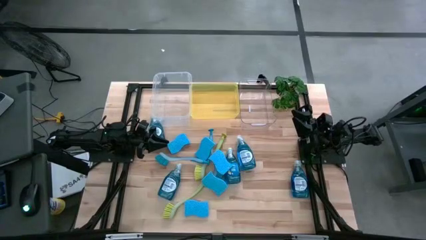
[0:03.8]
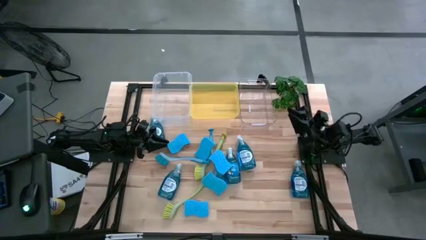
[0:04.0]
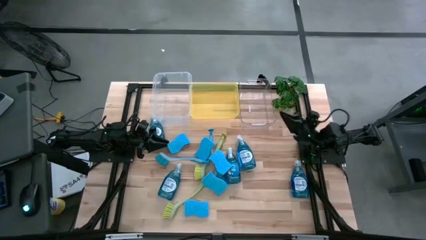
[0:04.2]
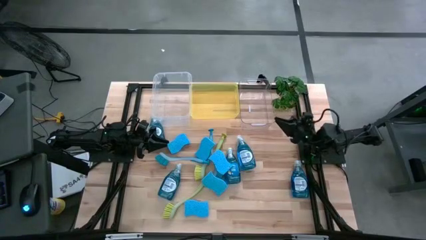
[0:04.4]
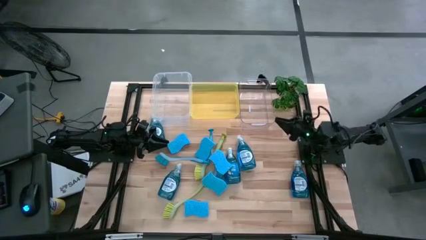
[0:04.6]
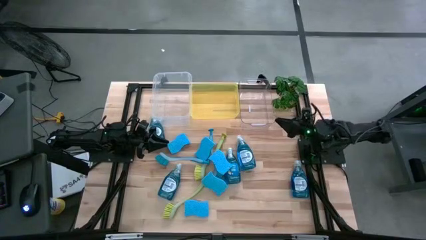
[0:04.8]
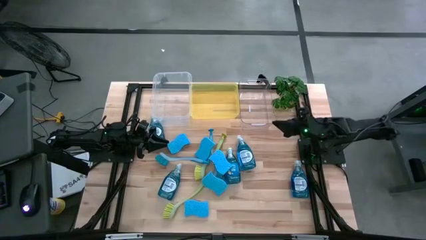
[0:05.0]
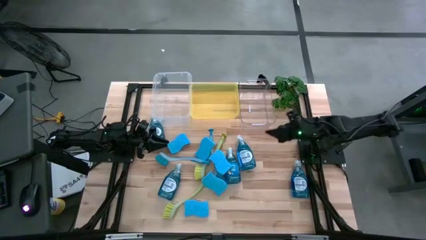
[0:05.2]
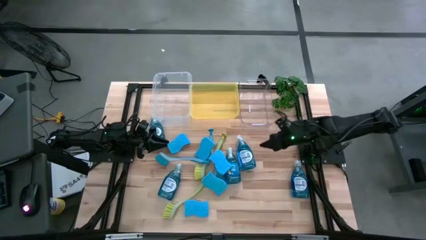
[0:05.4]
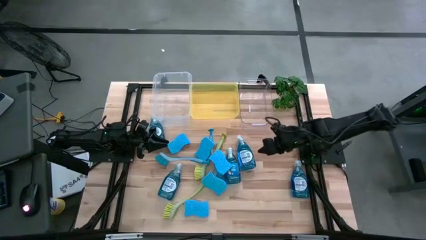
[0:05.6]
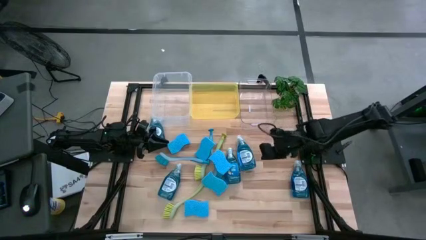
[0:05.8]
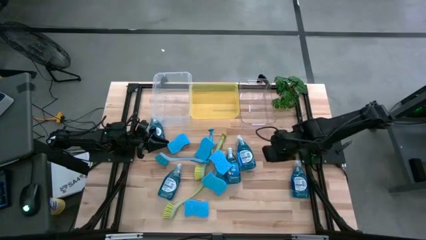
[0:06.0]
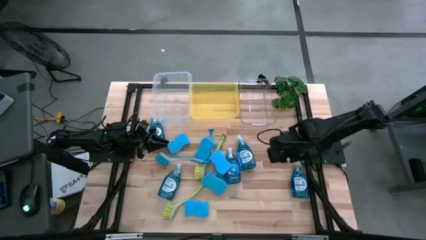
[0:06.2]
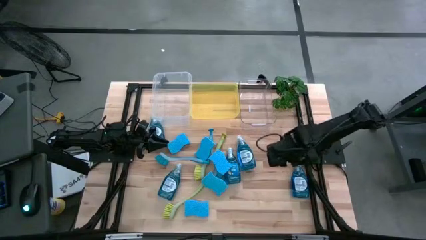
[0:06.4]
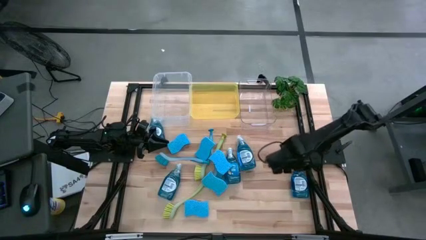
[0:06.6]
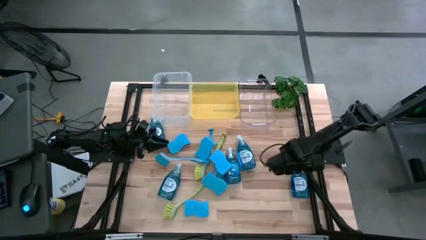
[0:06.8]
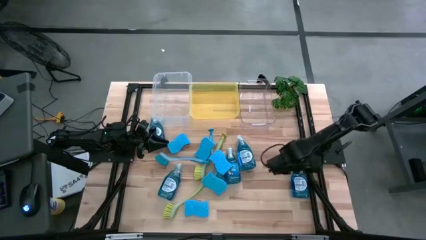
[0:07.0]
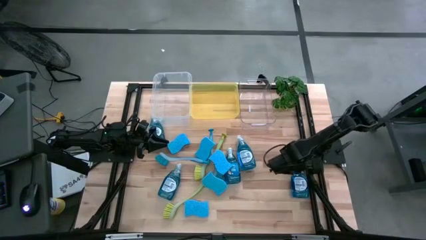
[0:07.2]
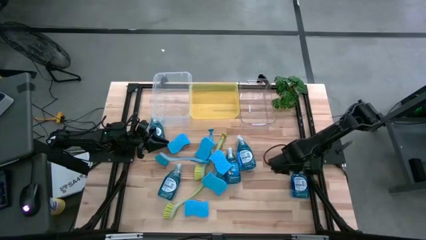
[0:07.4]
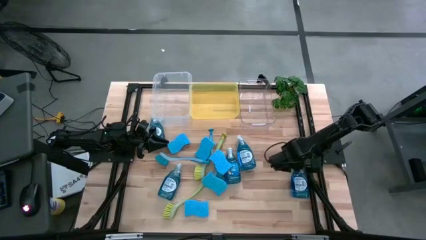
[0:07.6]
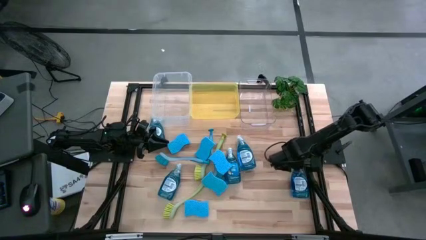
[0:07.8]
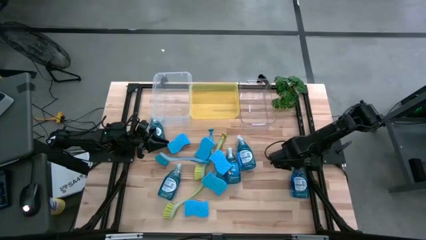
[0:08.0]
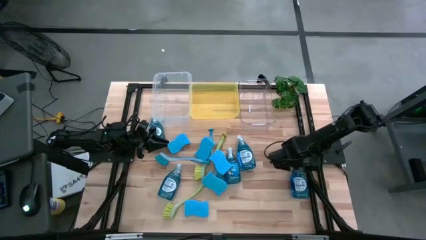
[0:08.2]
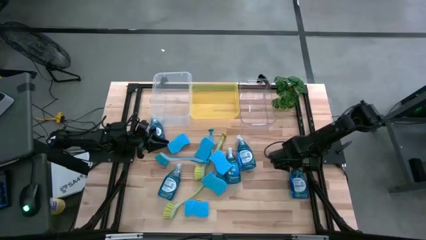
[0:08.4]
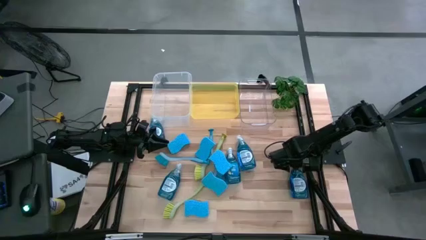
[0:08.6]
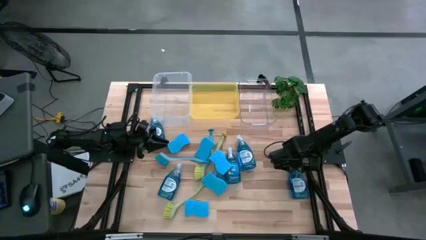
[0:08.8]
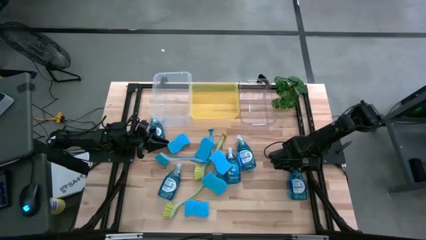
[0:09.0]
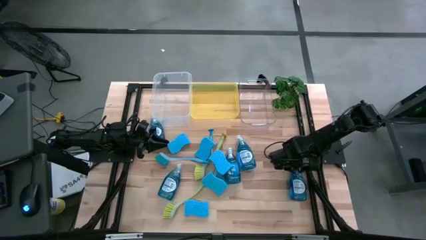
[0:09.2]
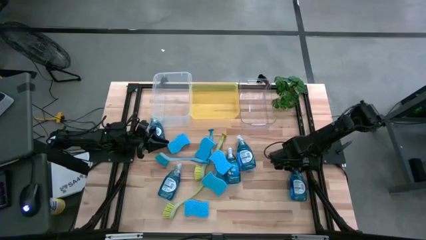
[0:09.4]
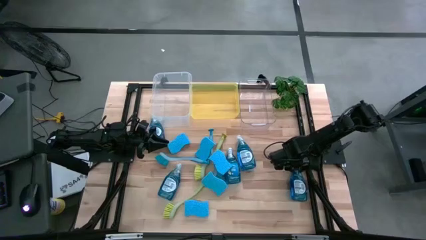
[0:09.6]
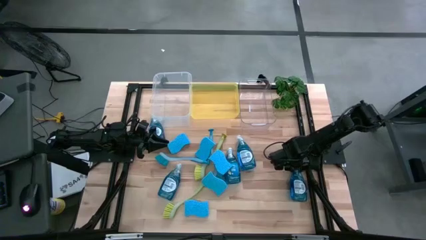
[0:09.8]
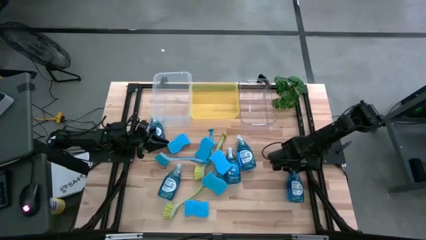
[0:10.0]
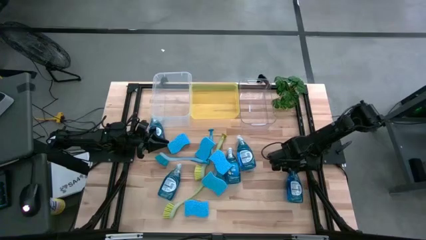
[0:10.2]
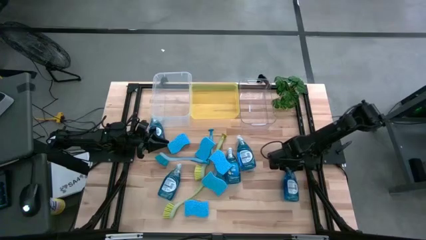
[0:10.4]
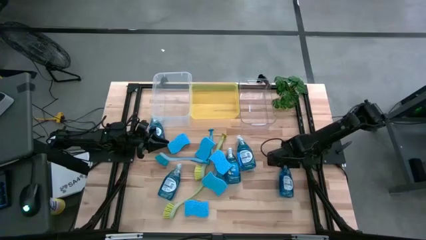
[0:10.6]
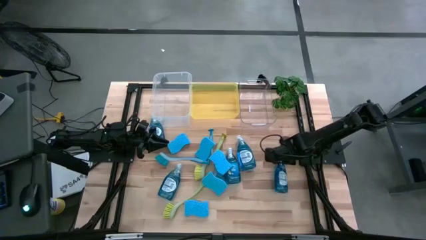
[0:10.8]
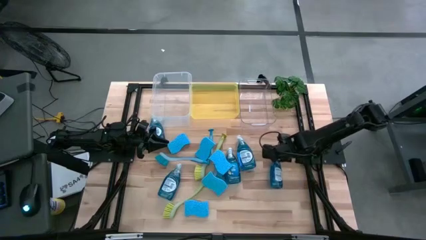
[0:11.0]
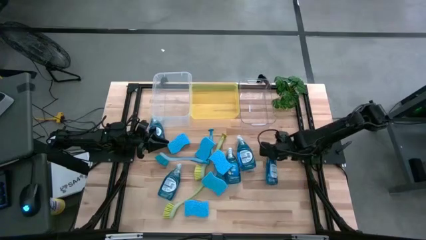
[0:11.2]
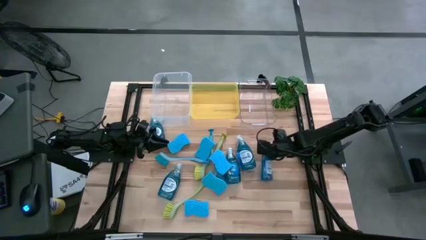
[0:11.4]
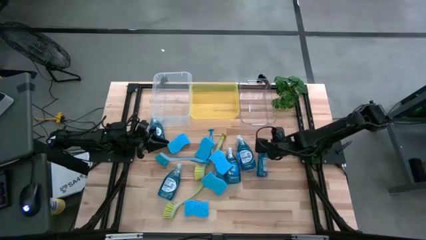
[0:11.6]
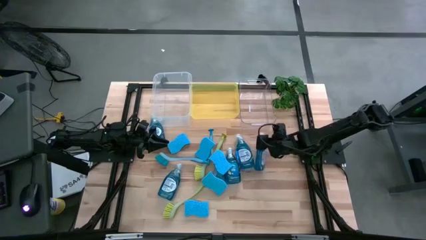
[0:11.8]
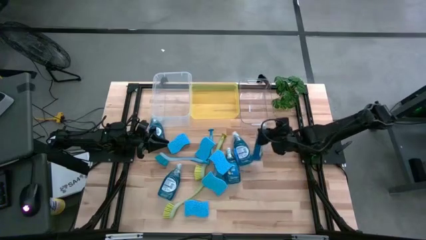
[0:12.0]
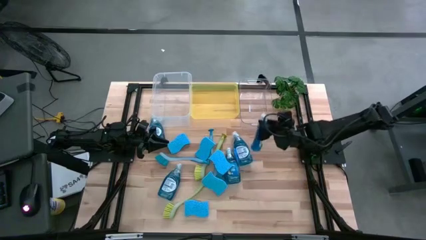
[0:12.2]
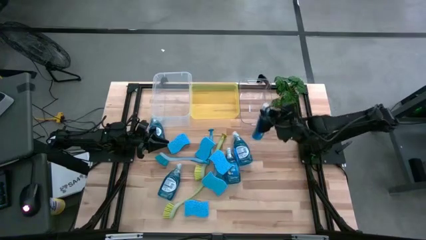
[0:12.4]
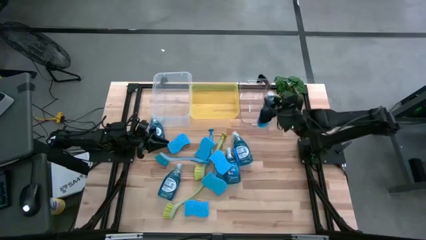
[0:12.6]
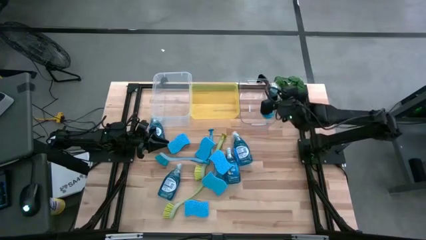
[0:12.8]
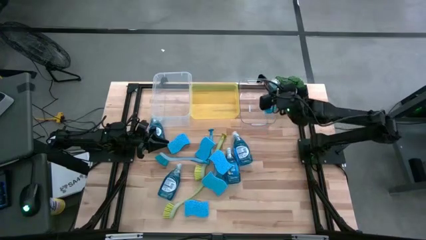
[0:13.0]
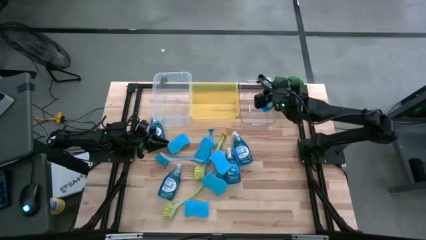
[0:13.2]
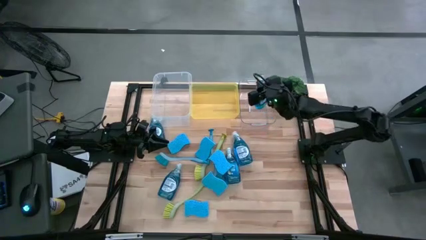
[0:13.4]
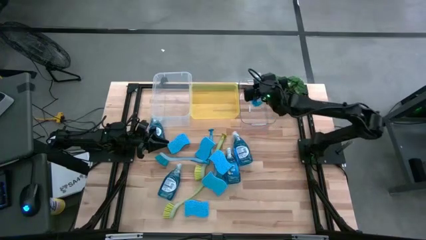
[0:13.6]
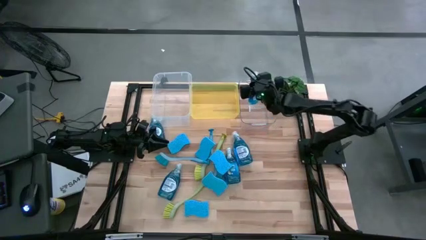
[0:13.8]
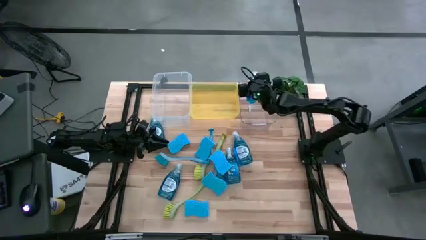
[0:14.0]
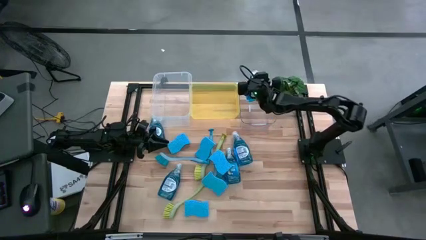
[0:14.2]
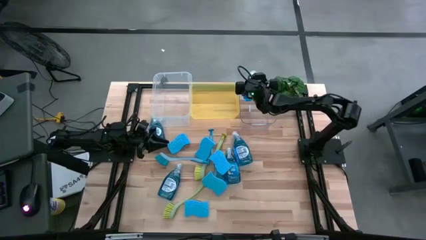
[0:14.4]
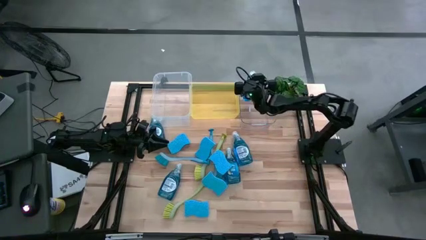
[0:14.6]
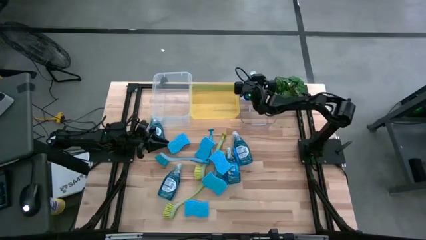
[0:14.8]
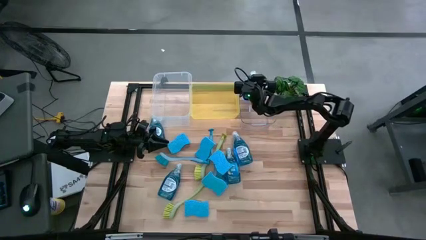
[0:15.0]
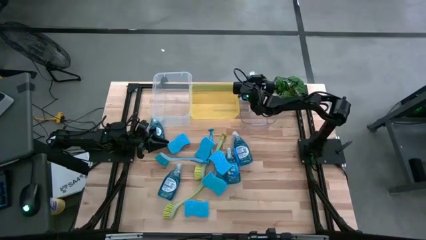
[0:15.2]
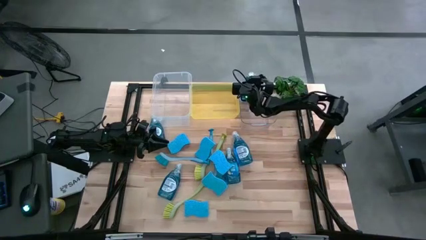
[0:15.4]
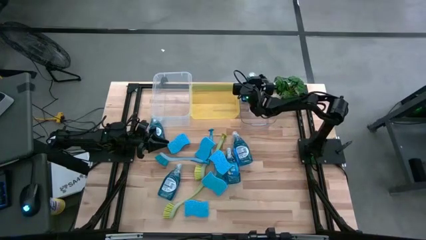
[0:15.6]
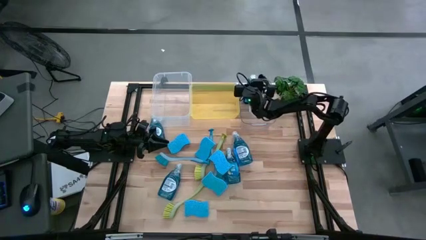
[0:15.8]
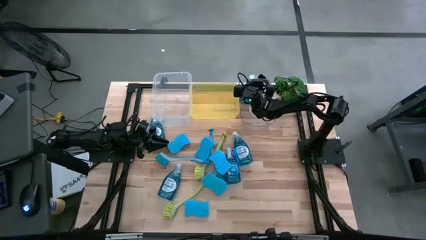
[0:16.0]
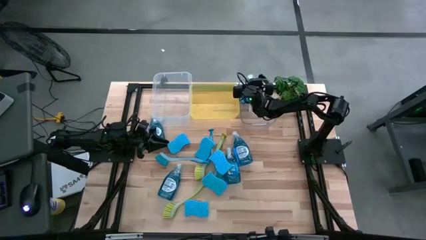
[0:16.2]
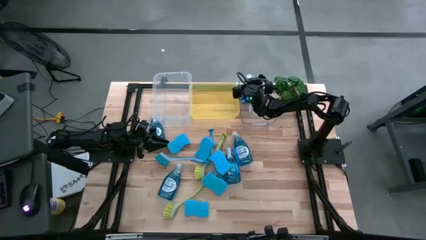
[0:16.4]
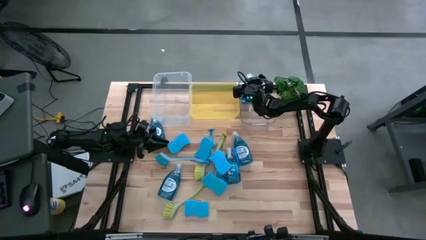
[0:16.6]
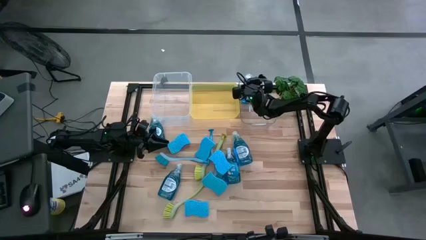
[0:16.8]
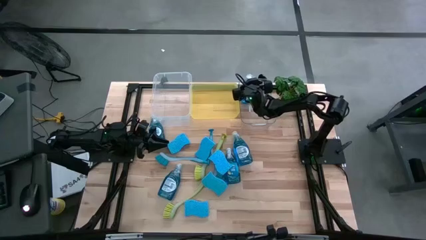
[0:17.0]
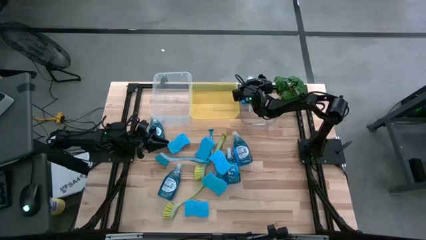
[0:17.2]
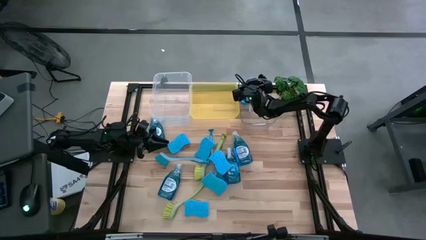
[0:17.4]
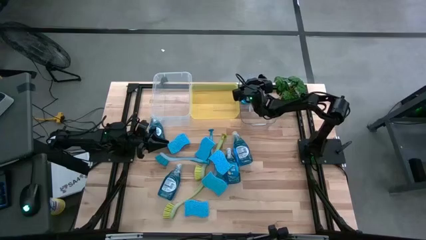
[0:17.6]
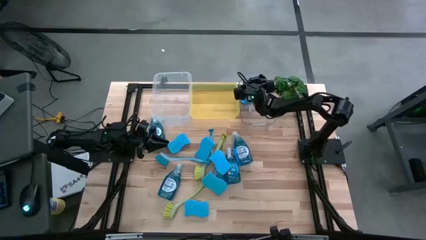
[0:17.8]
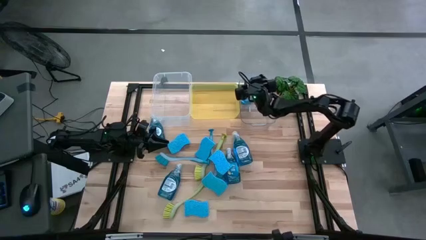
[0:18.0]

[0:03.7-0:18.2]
Task: Pick & Place Kitchen Sink Supplies
Put the blue dishwasher liquid into the transparent bin
